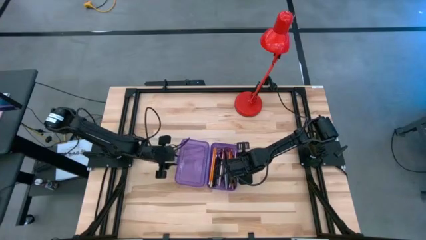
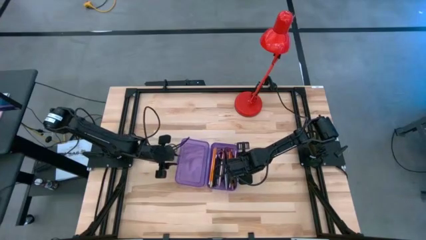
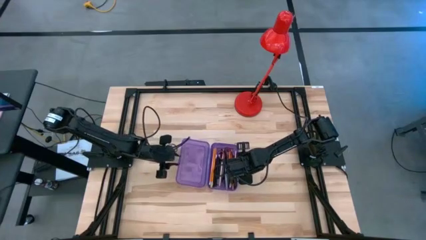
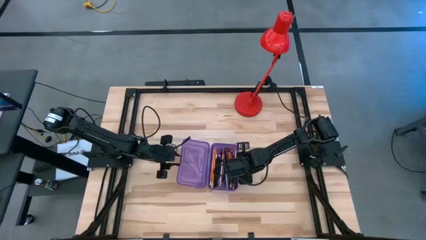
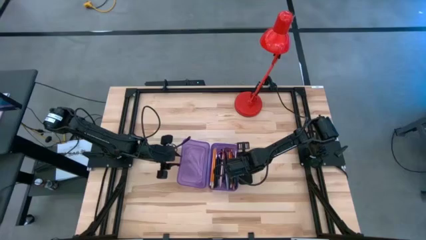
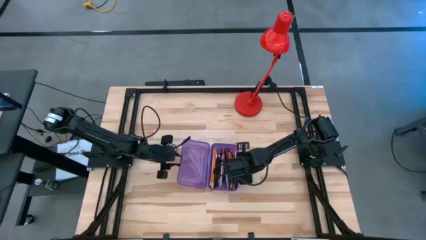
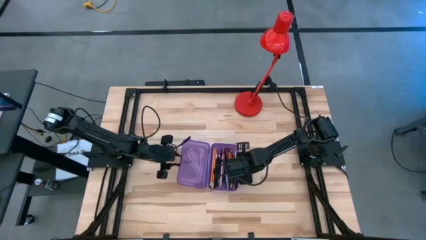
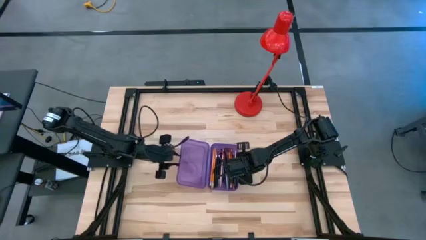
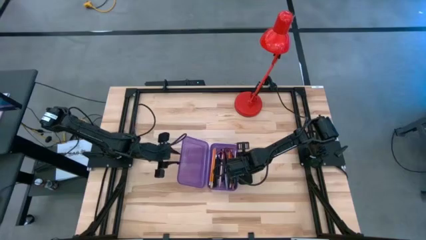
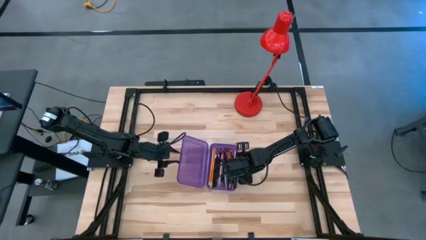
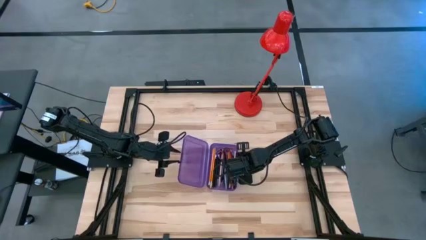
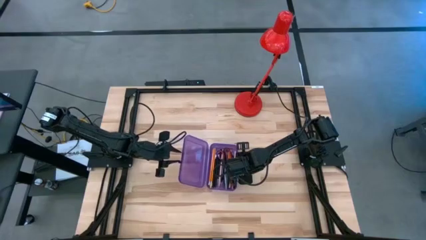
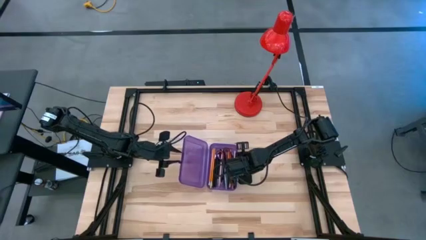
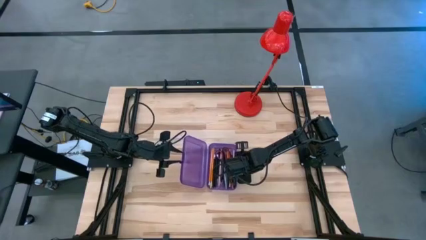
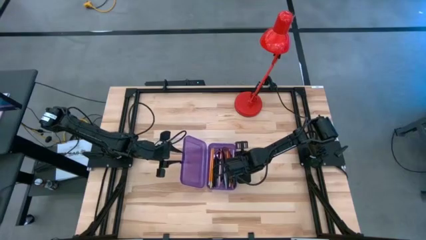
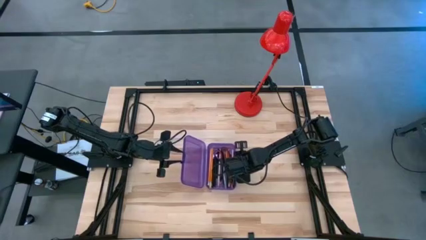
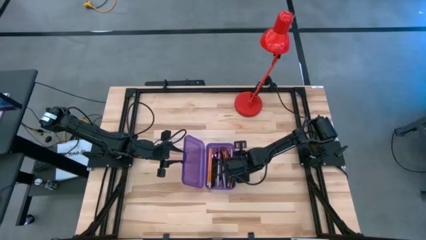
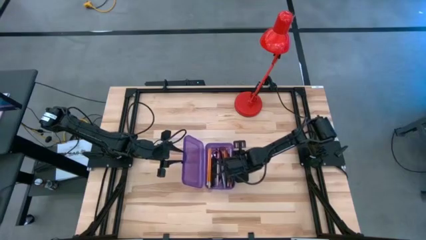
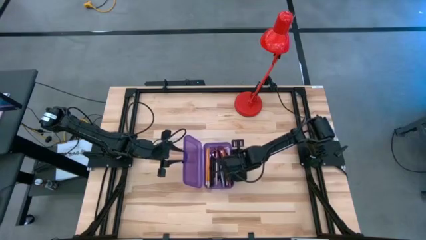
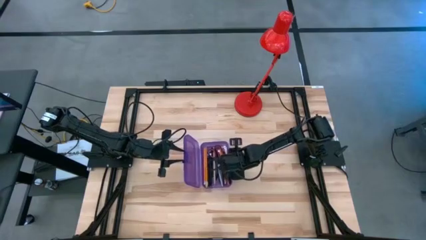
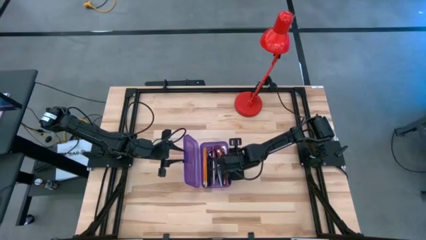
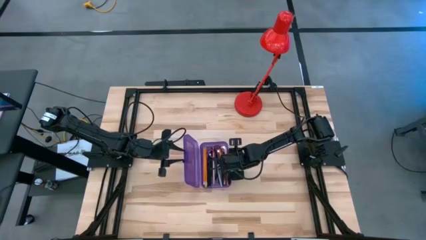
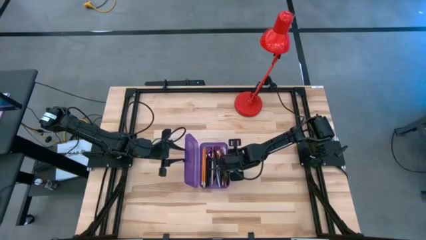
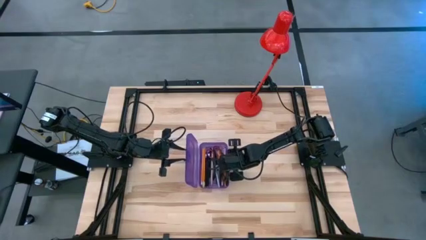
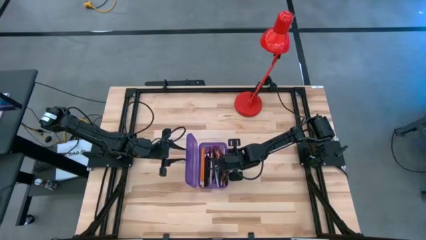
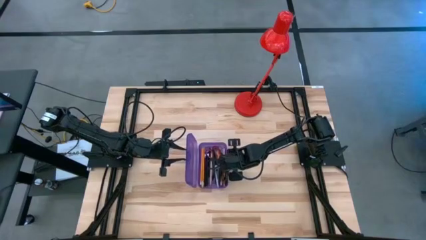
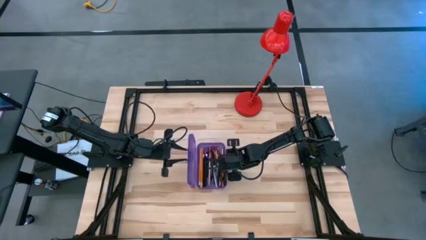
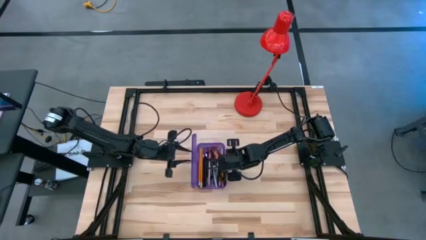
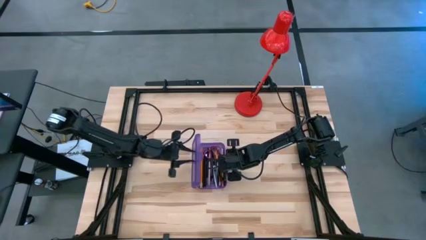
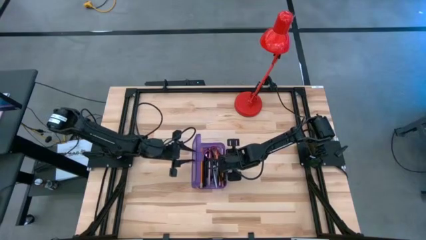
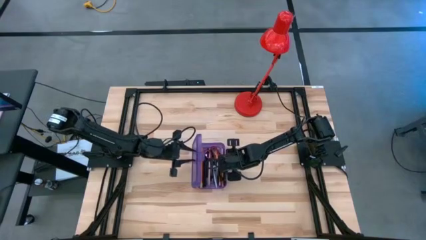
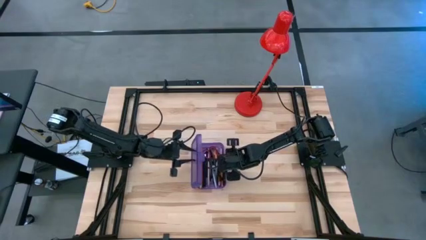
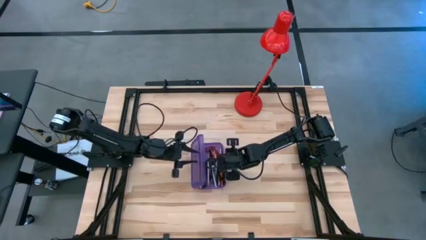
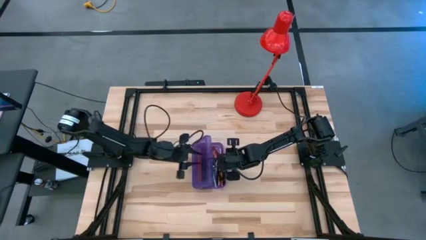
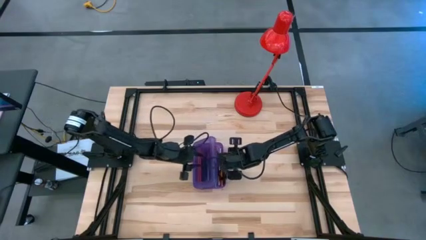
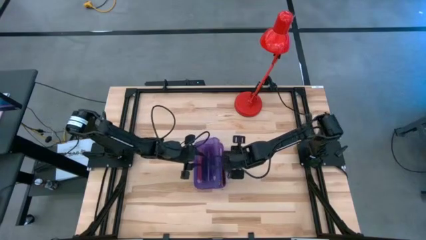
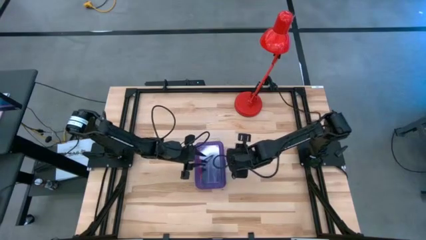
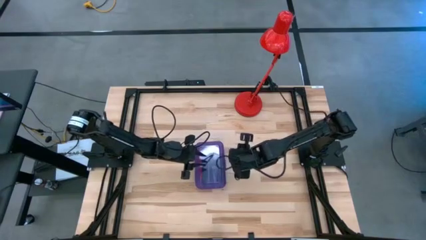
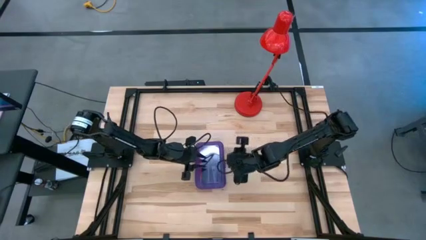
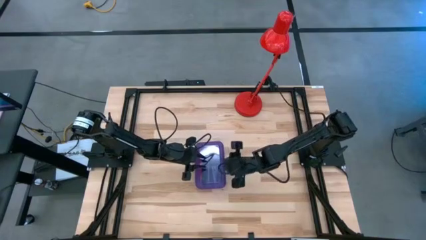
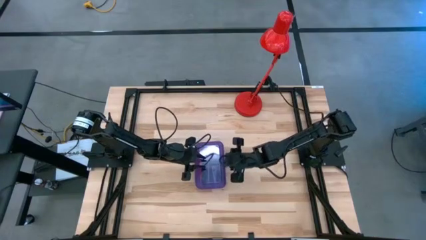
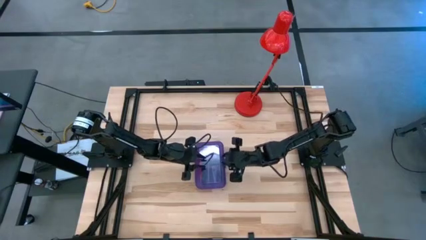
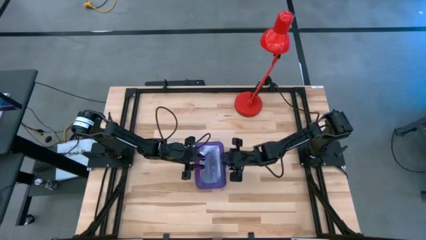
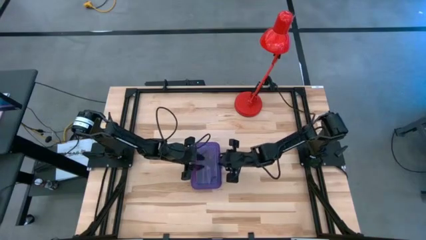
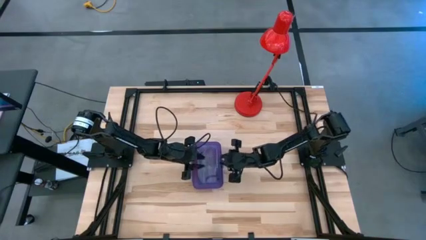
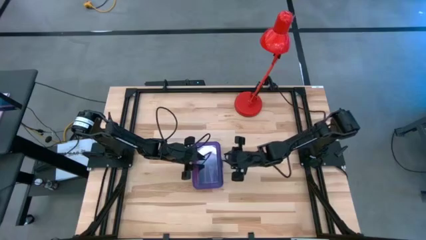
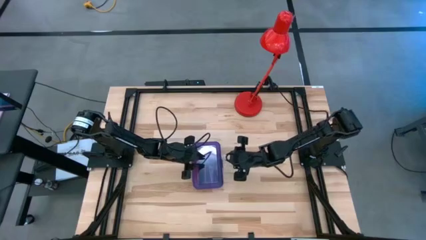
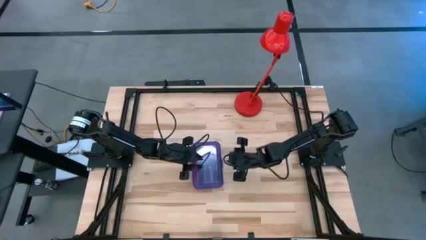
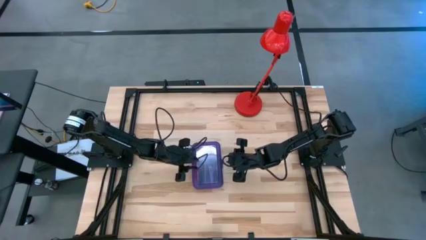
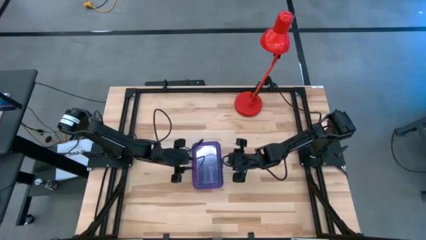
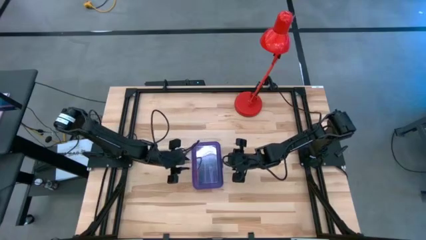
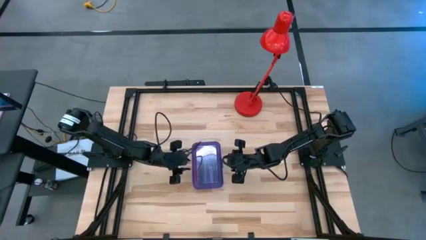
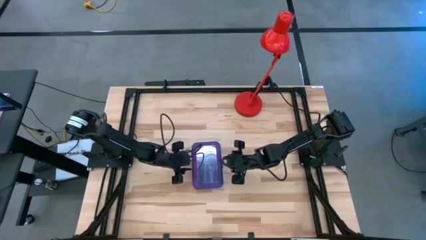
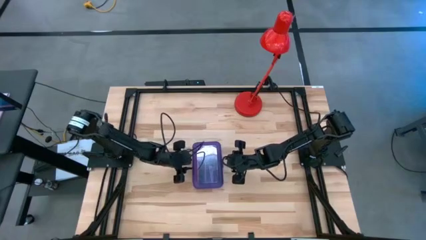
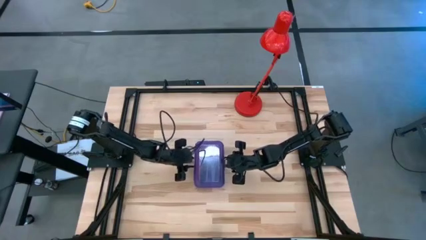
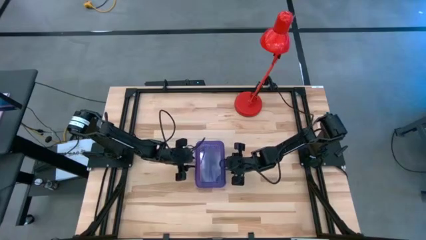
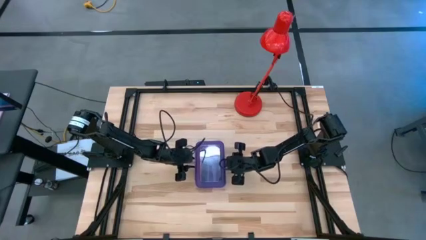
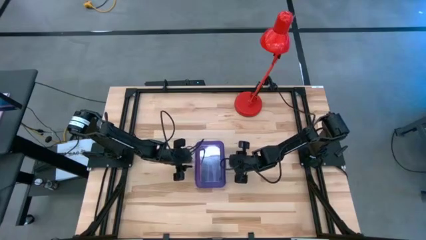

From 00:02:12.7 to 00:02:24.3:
Task: Pick & place school supplies into a supply box
Close the purple supply box
